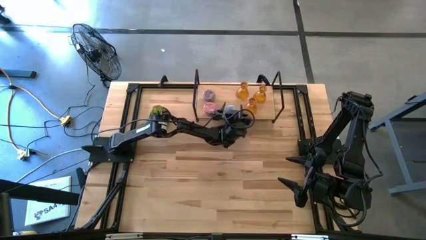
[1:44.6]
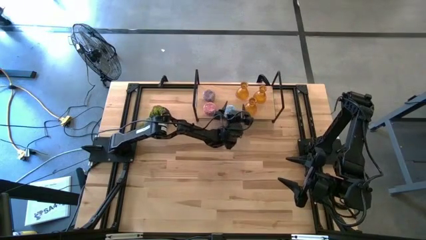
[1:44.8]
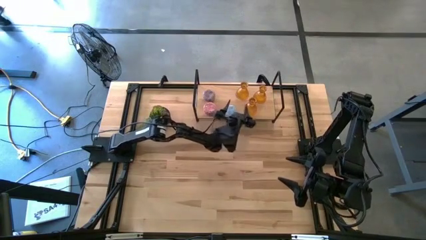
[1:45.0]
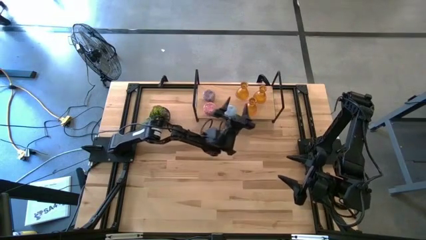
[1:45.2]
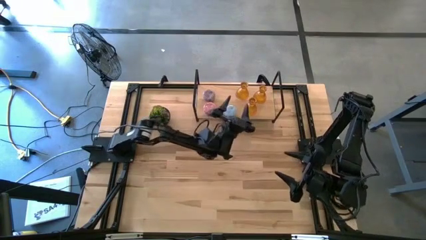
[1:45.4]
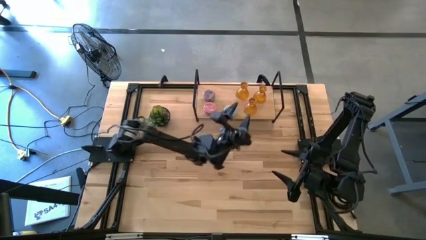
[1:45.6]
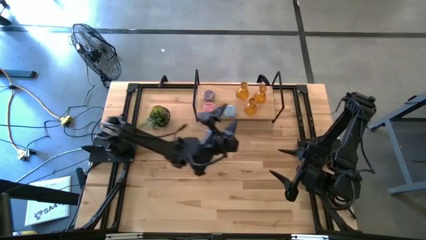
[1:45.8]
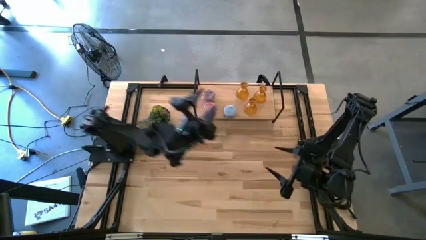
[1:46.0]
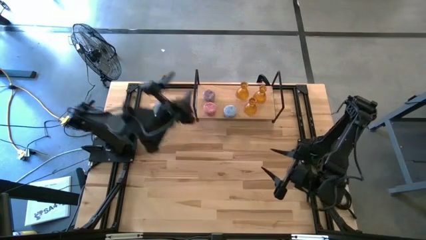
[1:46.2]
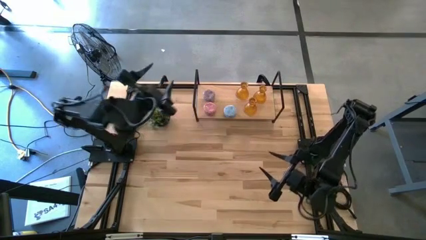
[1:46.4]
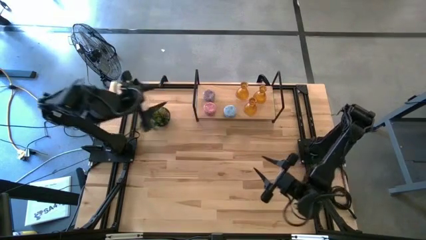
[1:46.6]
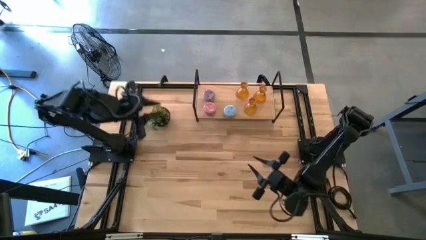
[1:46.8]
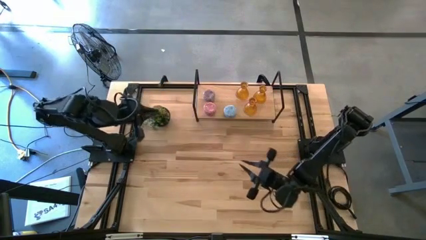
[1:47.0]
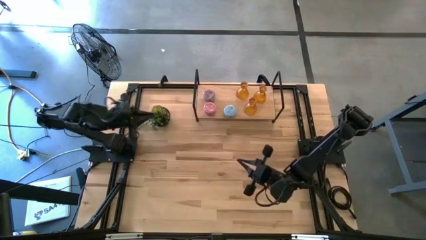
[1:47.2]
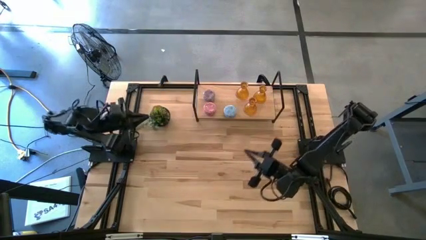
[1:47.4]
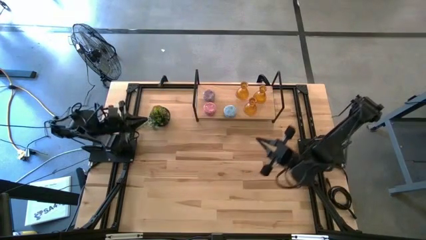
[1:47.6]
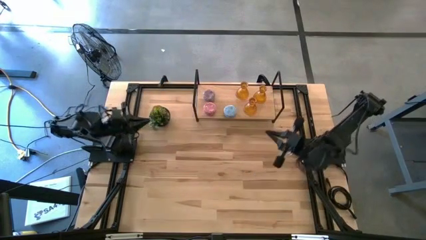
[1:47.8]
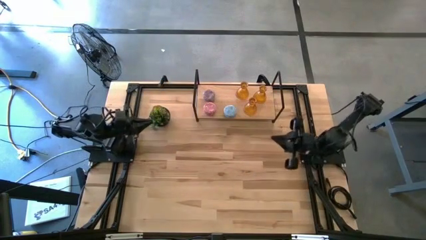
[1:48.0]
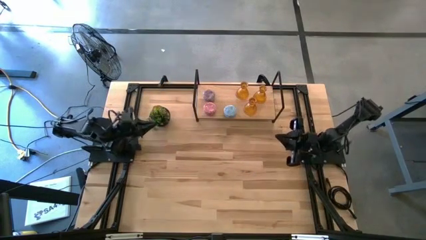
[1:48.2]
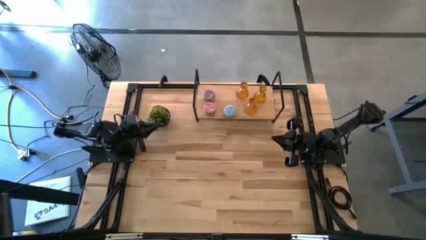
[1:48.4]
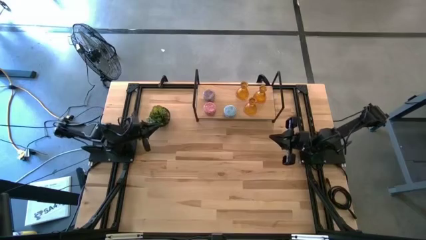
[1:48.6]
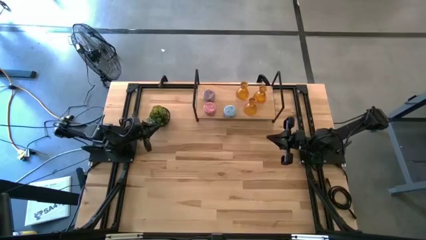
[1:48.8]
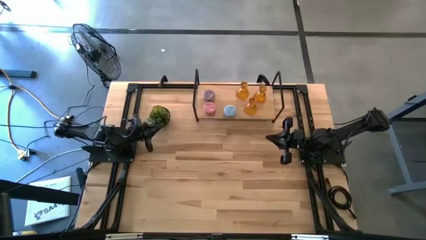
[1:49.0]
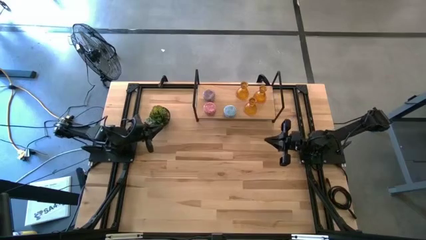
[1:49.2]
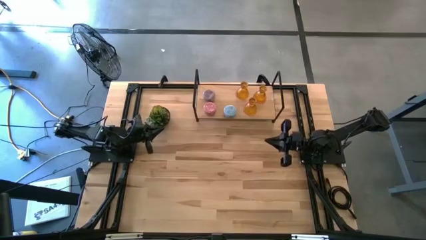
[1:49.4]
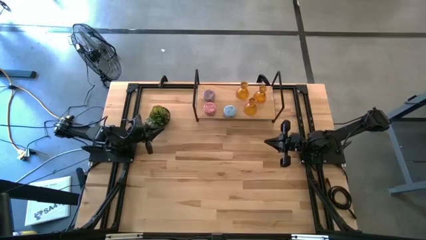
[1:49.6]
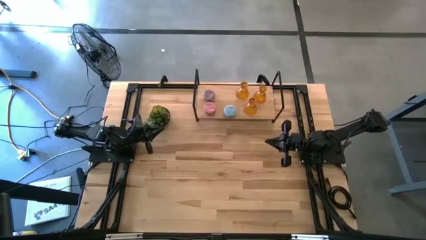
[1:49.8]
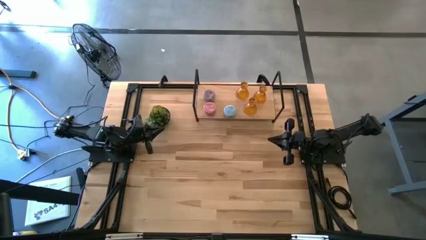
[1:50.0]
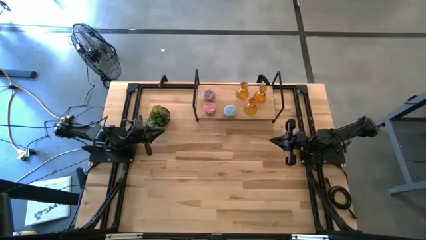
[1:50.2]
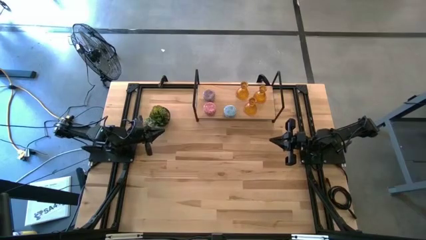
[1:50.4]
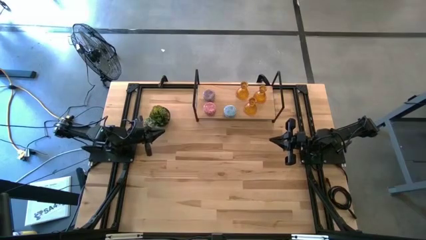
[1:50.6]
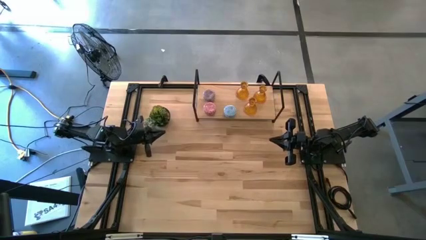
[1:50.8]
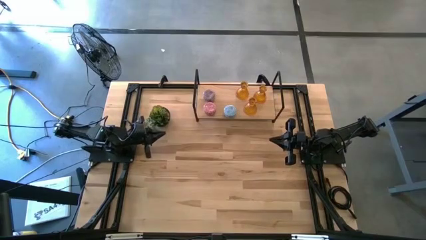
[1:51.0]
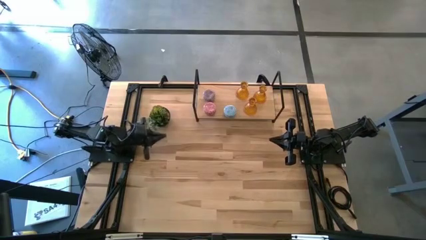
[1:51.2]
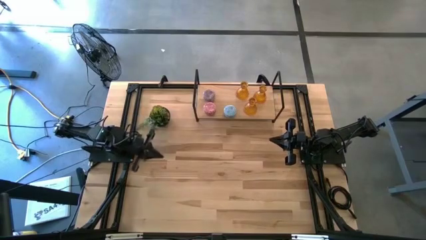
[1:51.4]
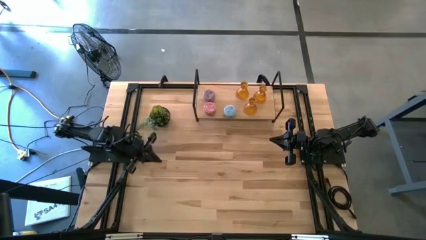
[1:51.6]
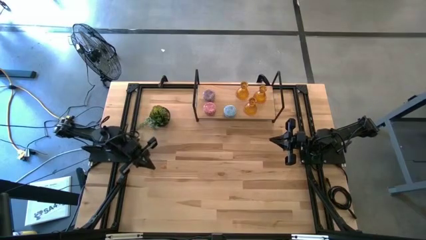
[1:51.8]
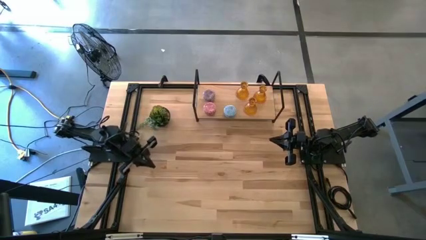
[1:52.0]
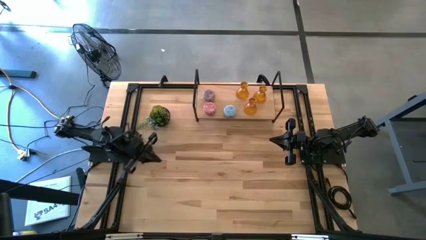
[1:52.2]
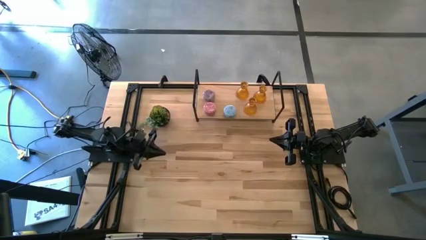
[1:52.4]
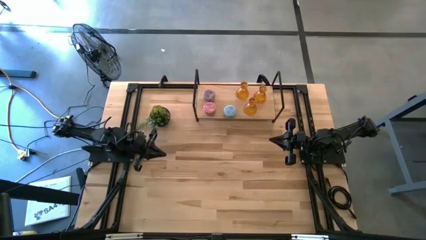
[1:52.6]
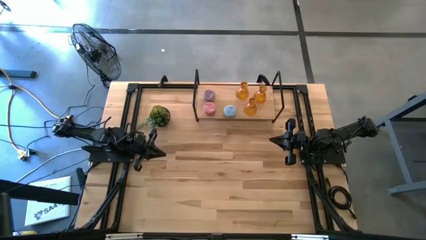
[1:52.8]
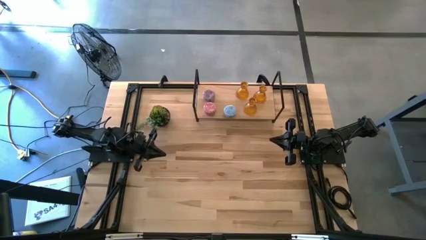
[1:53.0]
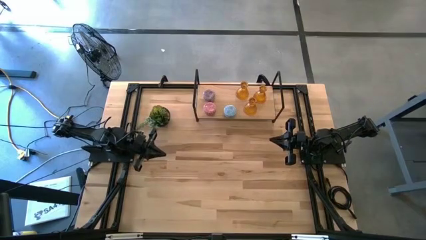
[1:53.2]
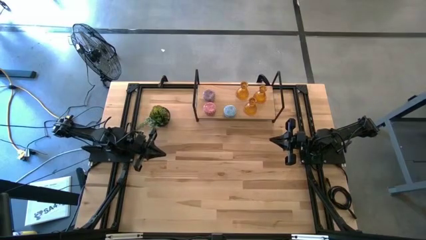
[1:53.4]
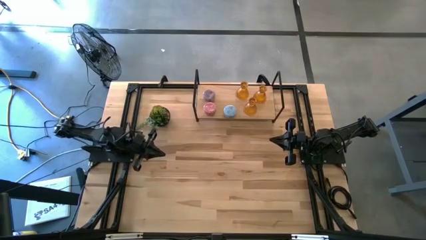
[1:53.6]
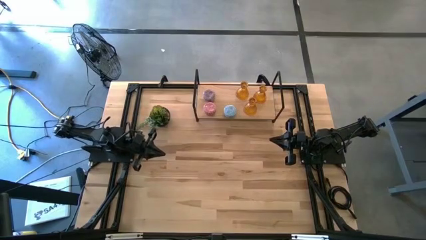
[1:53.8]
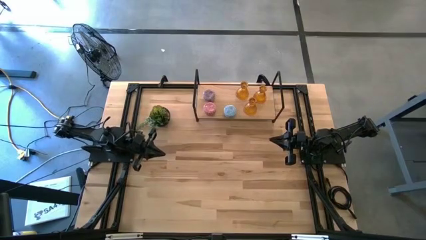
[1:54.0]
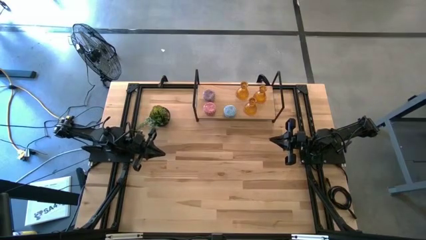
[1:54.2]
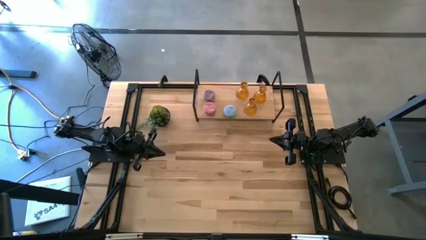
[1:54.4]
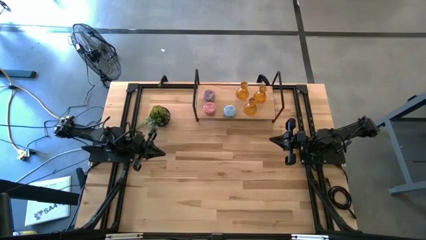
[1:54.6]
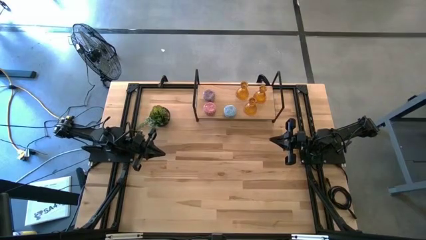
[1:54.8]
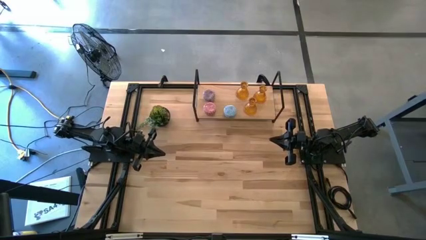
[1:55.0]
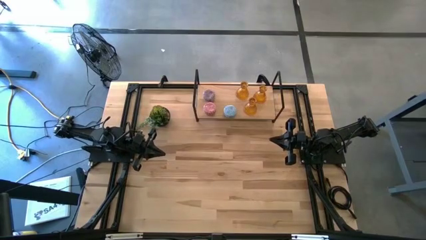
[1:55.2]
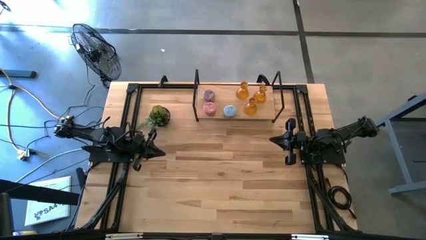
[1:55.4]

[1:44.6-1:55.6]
Task: Pick & Place candle stick holders
Return to Home Position

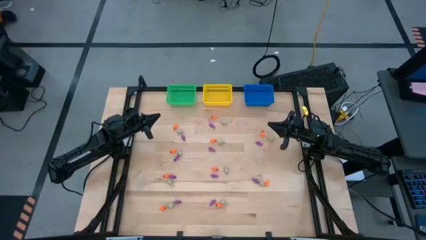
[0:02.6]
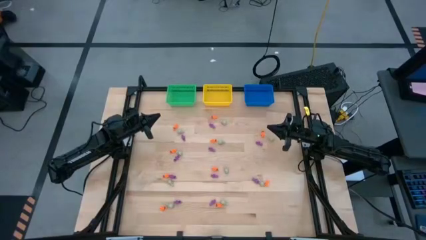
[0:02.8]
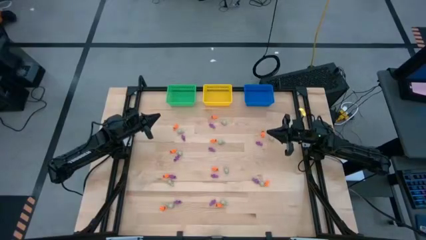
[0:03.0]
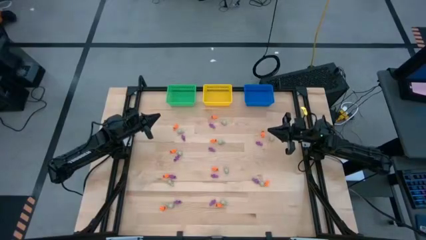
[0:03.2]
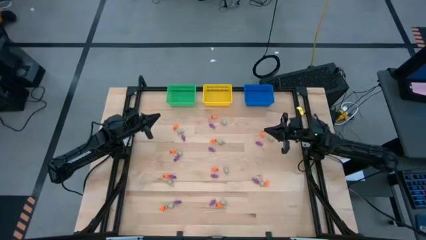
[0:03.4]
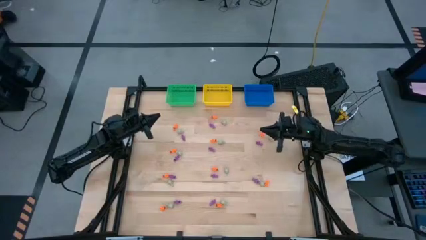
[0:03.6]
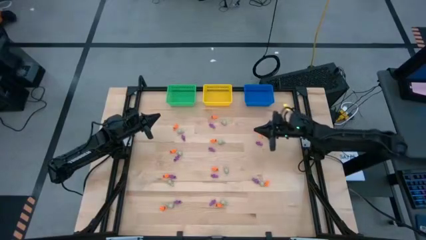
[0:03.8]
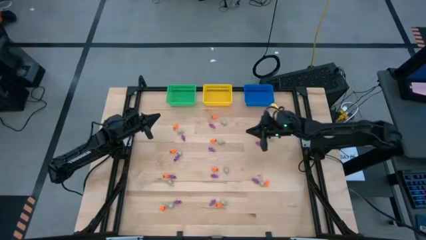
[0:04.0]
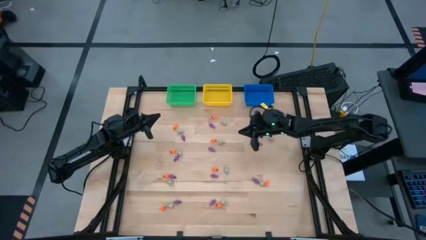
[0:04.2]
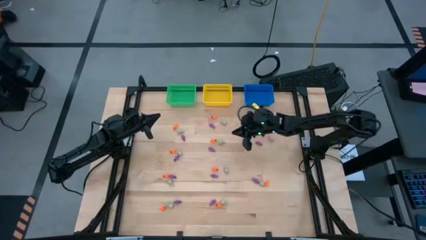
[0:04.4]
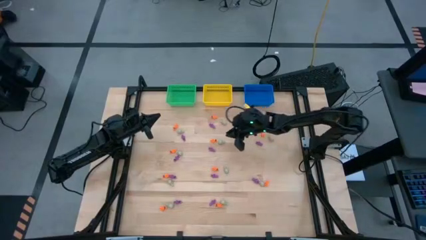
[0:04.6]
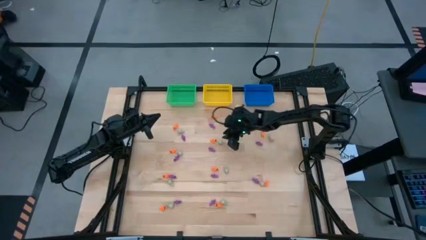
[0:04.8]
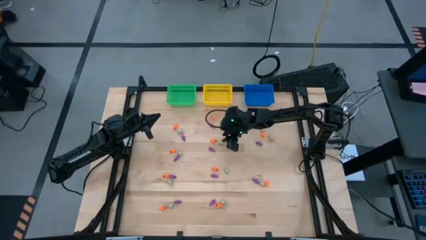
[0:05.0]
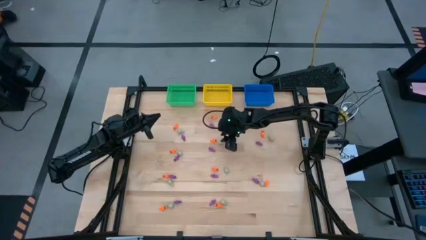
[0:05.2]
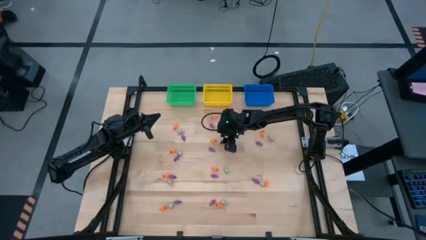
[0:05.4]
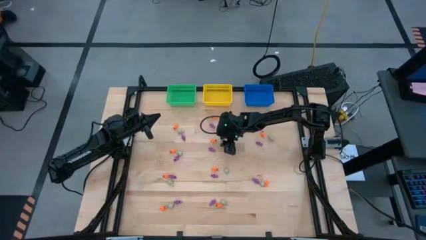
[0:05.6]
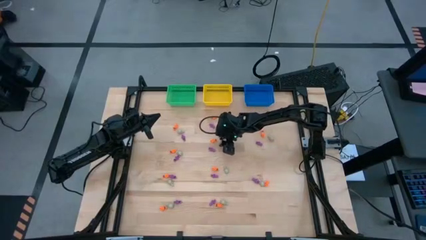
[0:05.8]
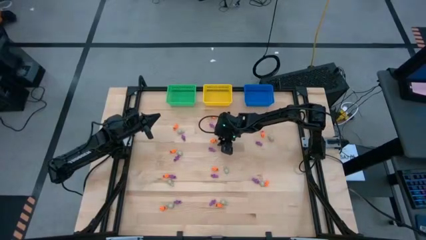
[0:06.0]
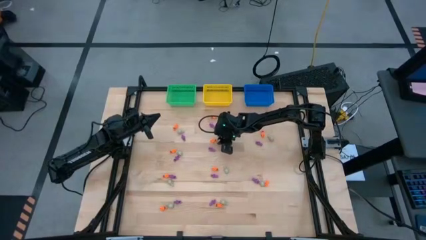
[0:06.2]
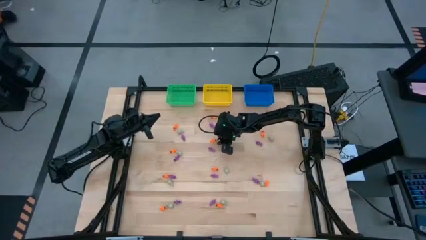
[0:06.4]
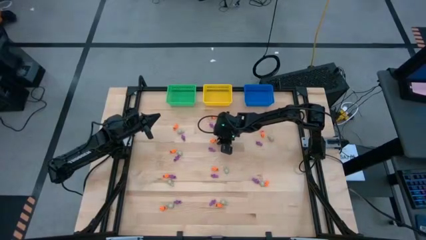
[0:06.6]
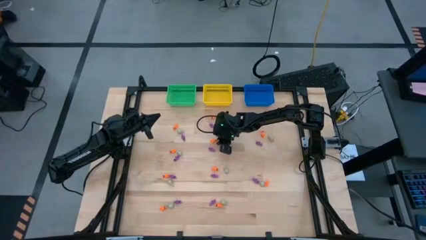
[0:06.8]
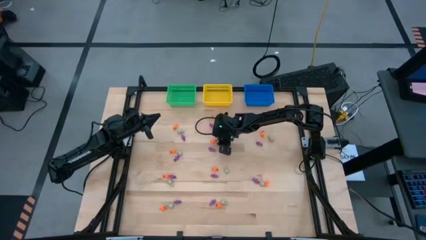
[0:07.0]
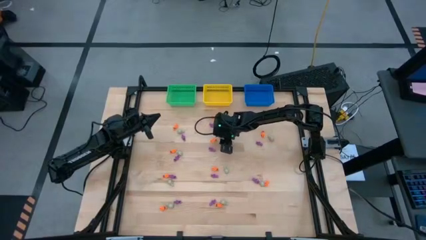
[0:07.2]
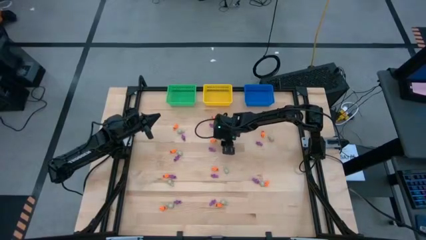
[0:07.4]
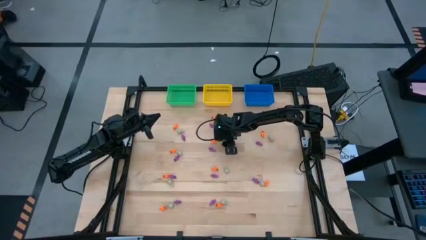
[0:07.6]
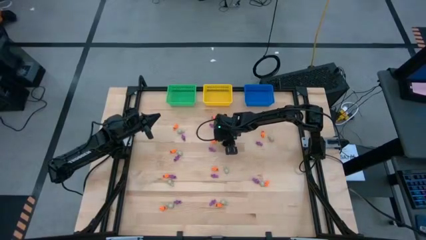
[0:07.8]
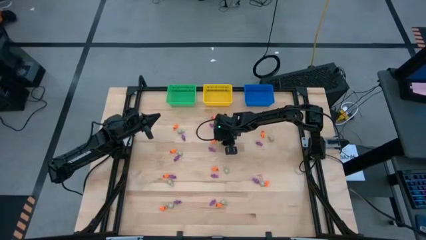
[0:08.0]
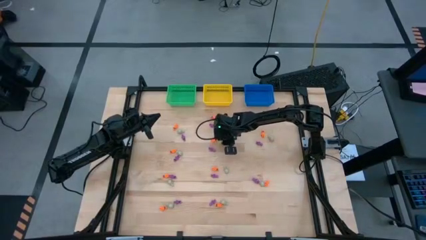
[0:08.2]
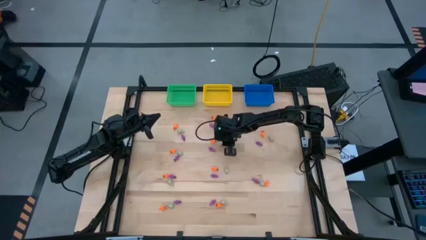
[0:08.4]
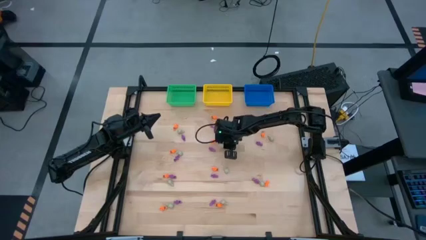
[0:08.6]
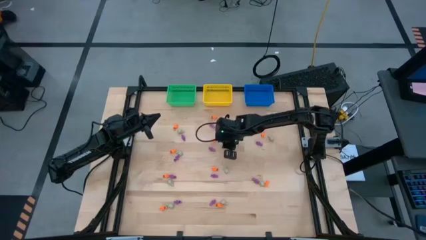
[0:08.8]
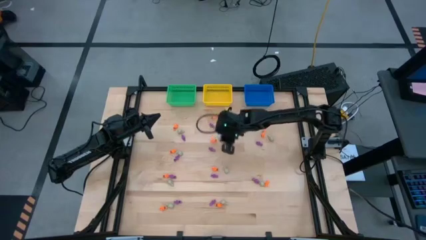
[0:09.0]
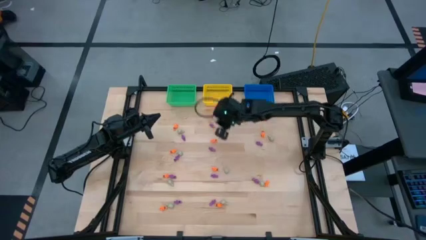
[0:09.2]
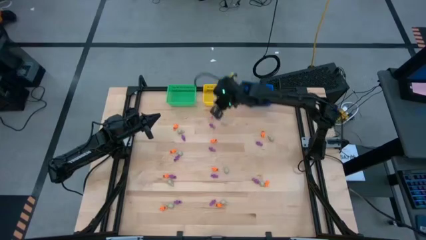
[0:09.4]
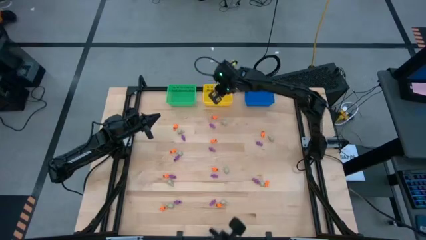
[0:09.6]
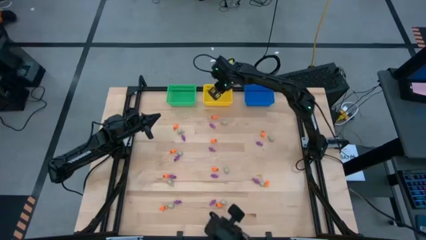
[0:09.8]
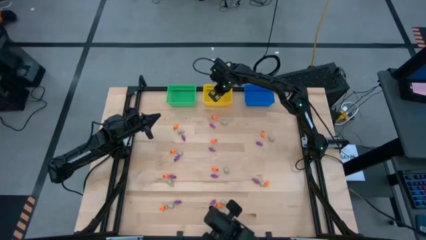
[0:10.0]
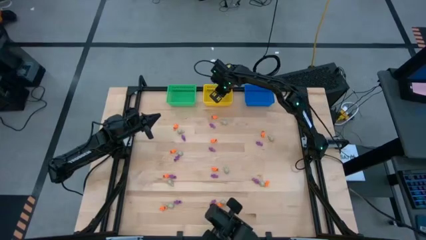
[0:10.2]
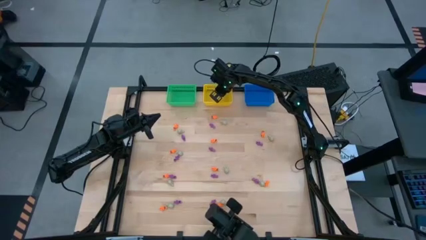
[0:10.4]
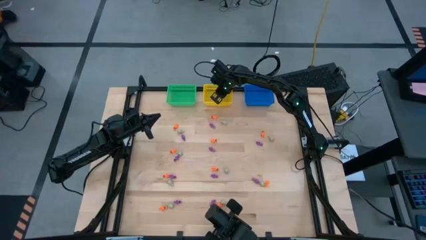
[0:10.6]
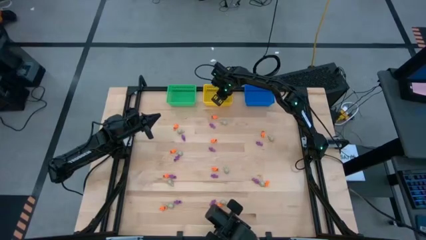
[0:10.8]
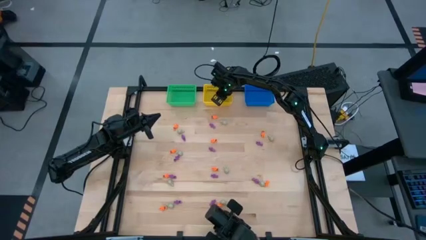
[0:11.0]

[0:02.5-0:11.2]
Task: Sort Halloween decoration
Put the white skull toy into the yellow bin
